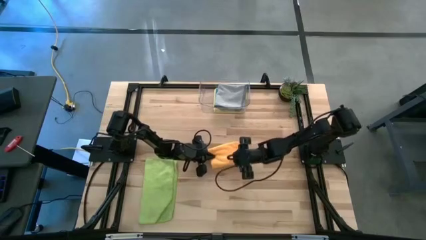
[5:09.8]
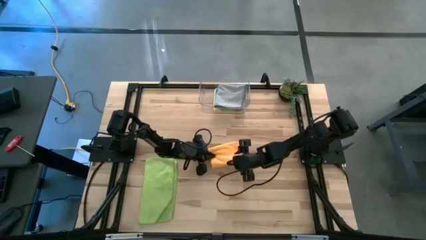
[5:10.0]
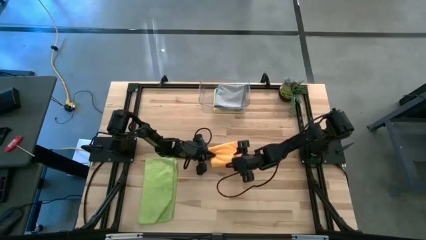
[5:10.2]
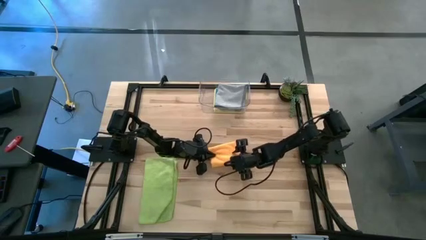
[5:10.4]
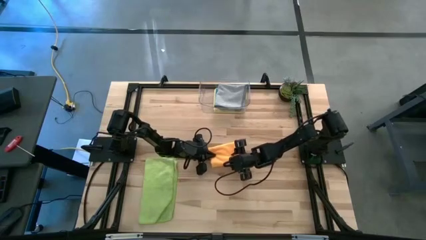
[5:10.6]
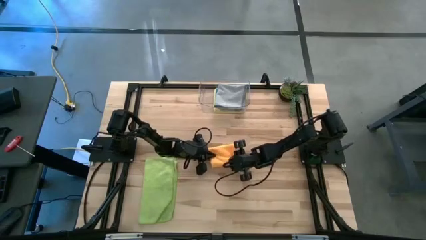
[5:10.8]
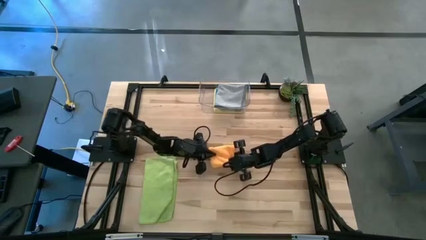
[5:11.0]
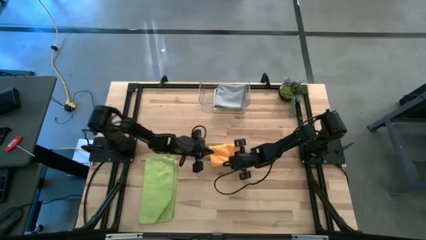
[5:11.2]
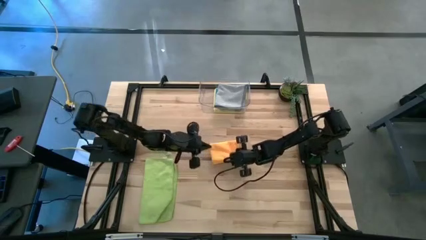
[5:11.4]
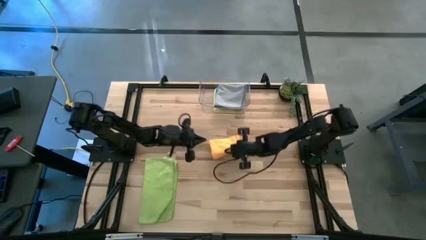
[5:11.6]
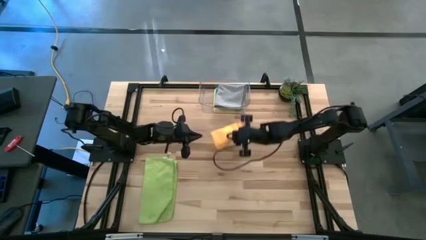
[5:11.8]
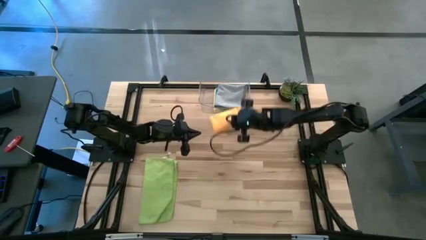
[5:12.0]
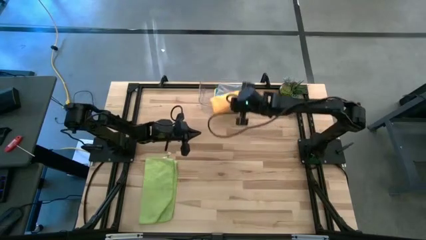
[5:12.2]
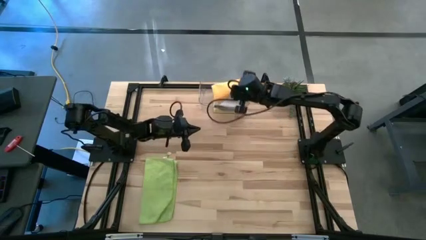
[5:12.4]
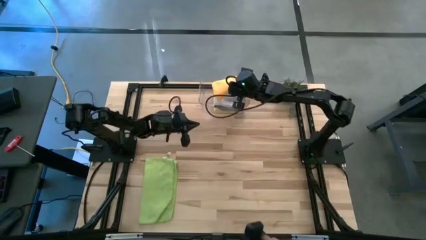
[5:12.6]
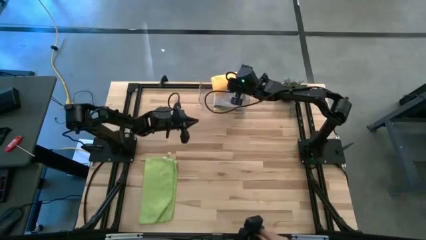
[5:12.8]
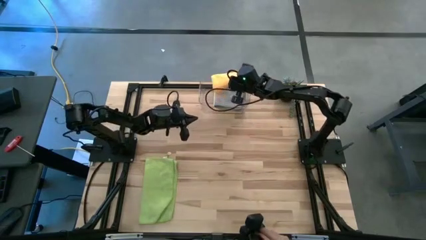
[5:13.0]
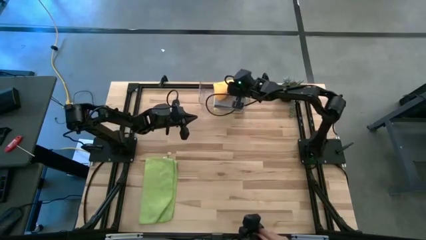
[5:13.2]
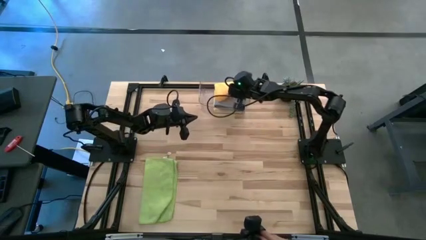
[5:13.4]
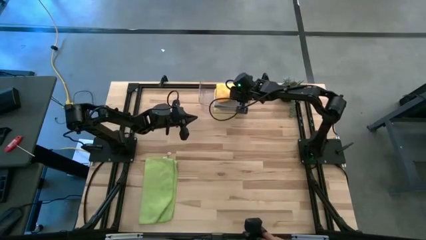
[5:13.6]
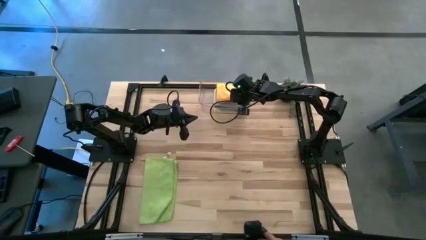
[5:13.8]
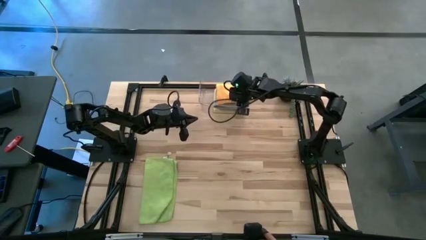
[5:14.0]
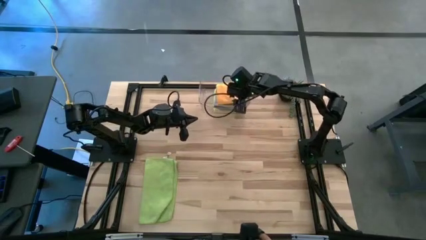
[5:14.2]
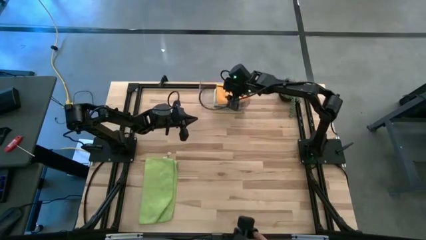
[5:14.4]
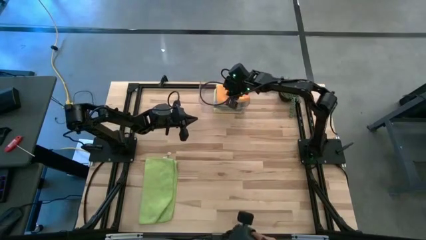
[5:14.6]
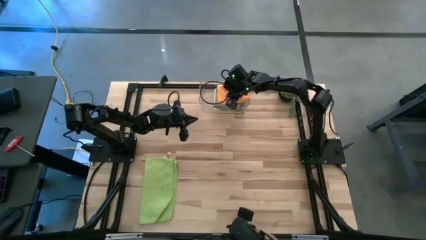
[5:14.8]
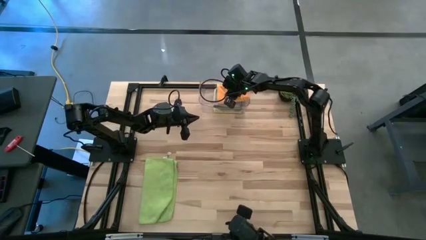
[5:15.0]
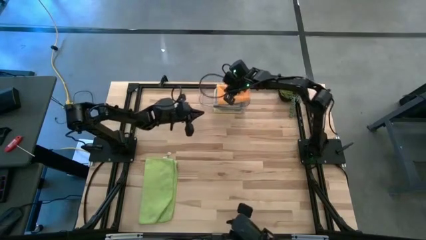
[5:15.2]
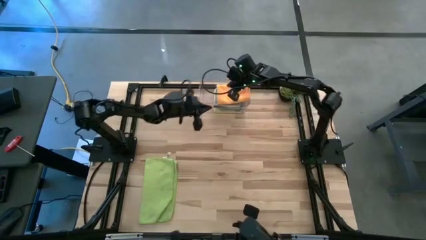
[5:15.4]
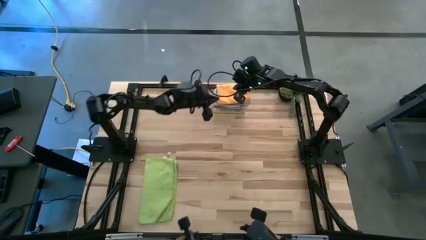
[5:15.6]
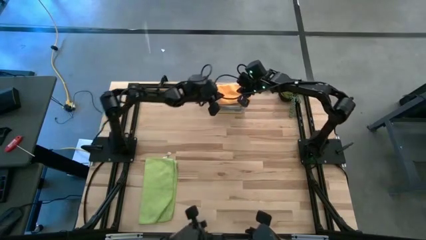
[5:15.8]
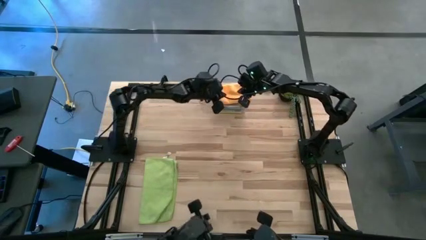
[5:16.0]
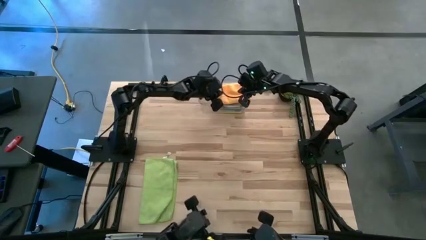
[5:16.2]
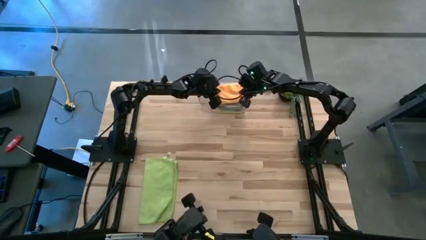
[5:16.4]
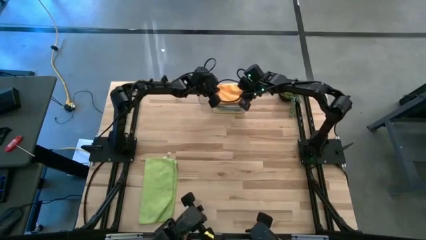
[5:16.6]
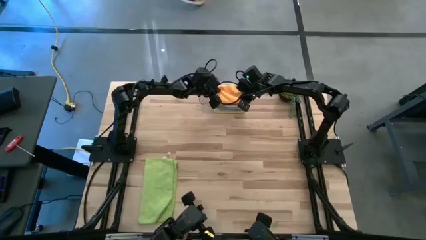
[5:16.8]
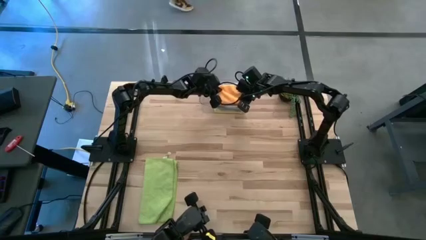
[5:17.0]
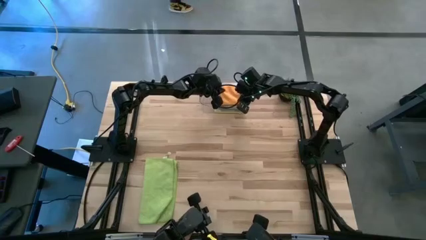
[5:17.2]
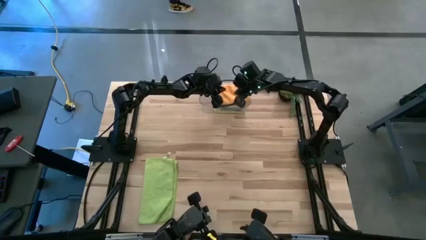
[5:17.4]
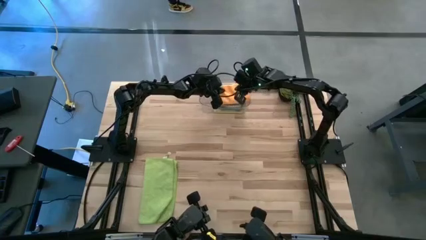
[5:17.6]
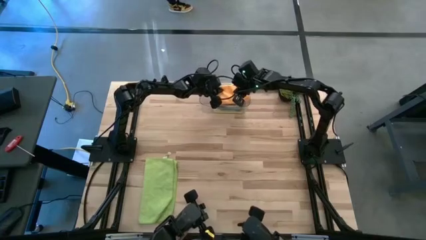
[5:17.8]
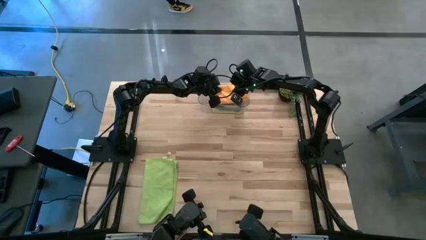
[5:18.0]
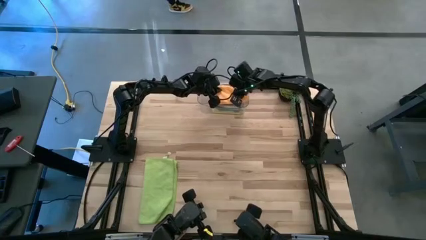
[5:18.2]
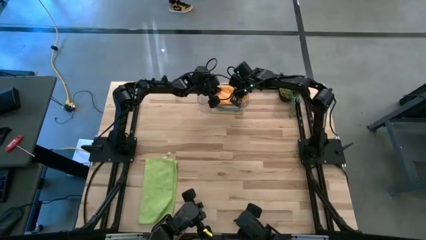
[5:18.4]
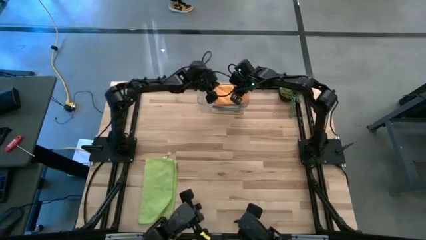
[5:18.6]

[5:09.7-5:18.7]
Task: Fold microfiber towels
Stack the orange towel on top of the gray towel in the transparent bin
